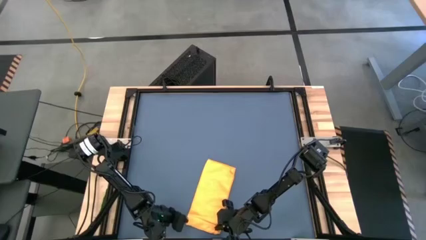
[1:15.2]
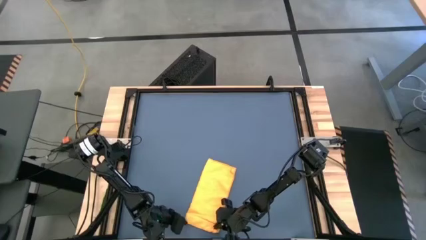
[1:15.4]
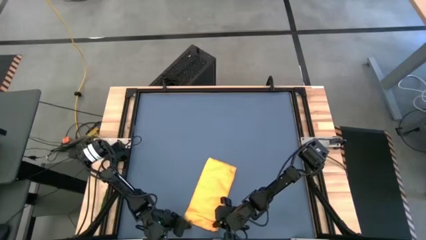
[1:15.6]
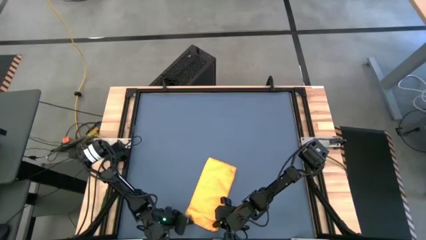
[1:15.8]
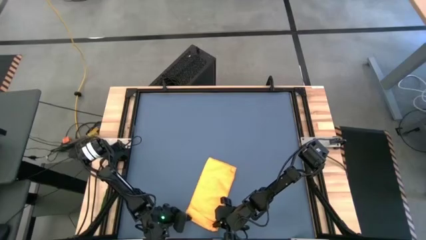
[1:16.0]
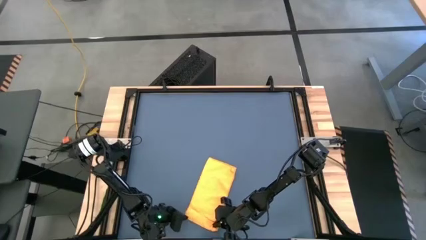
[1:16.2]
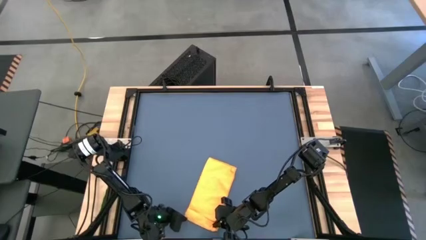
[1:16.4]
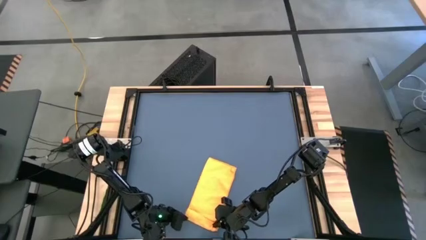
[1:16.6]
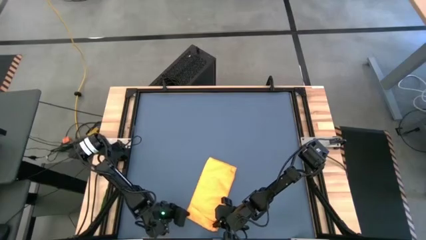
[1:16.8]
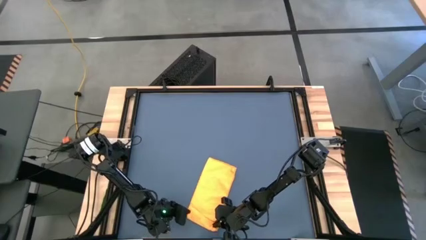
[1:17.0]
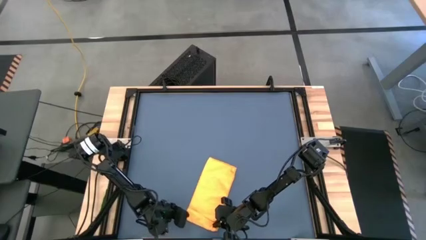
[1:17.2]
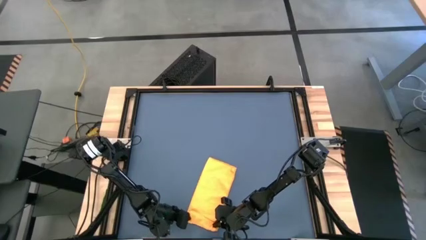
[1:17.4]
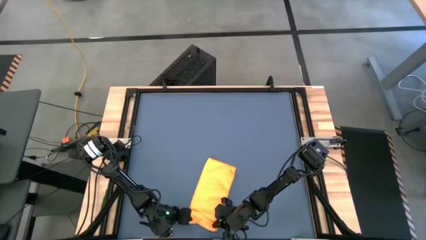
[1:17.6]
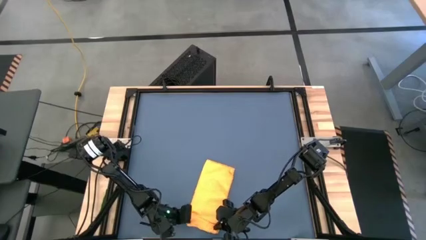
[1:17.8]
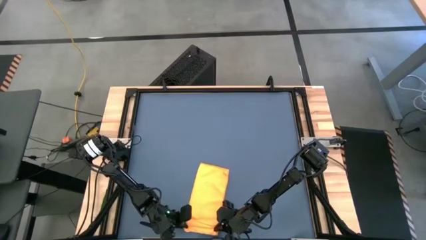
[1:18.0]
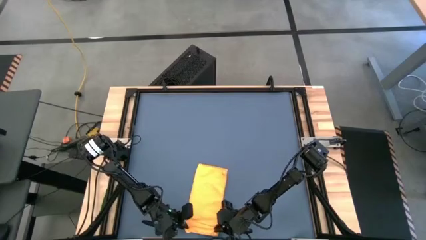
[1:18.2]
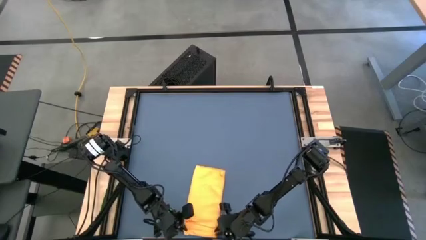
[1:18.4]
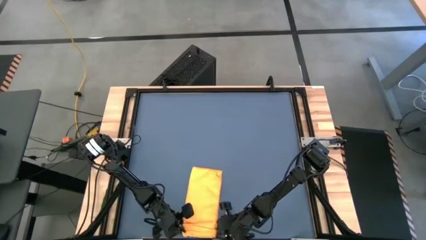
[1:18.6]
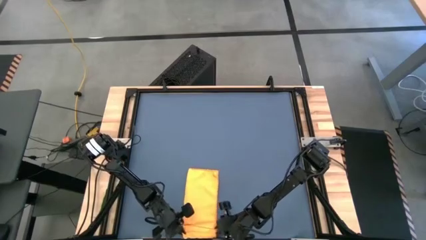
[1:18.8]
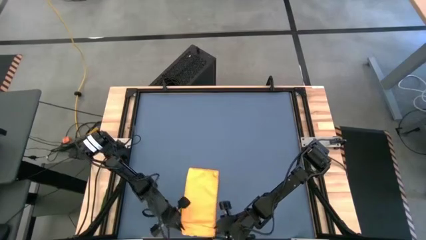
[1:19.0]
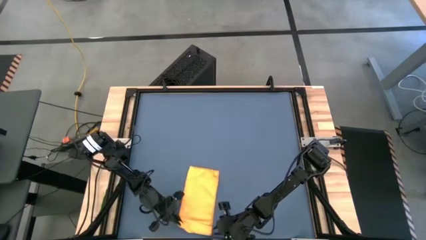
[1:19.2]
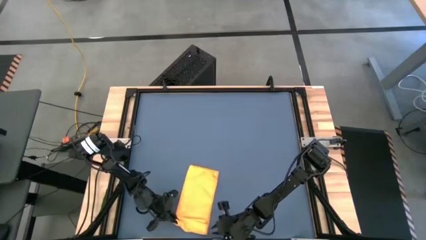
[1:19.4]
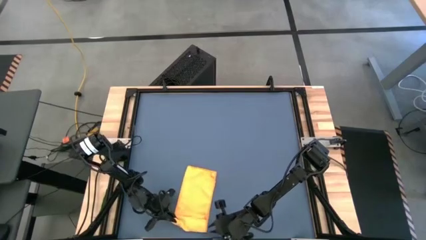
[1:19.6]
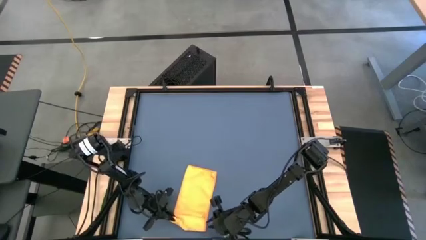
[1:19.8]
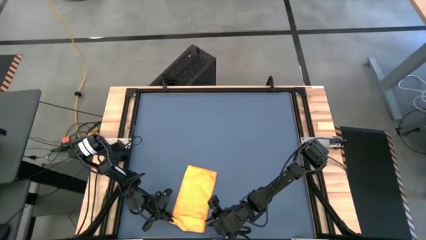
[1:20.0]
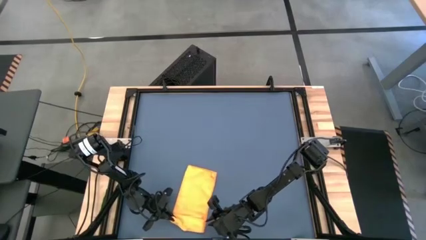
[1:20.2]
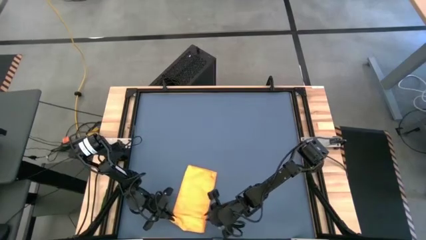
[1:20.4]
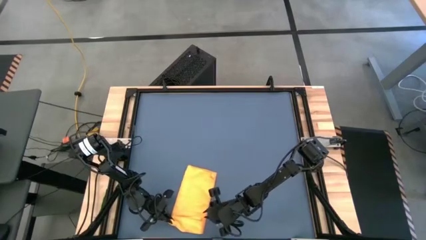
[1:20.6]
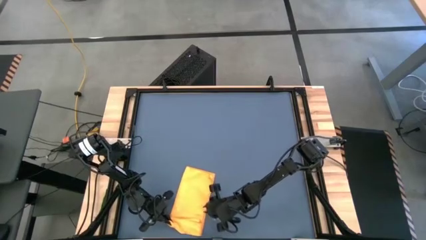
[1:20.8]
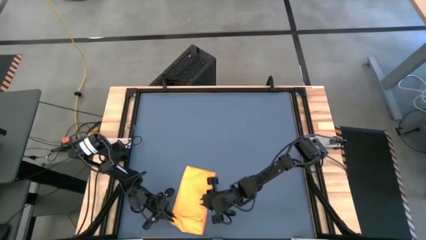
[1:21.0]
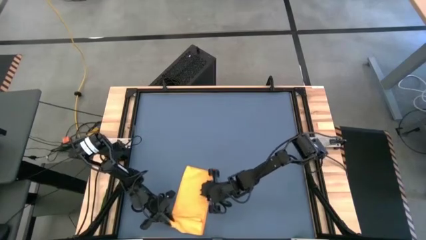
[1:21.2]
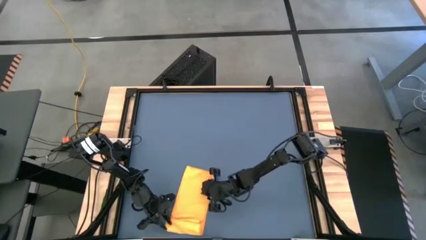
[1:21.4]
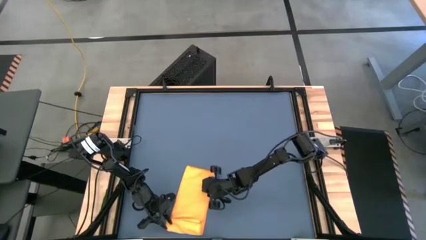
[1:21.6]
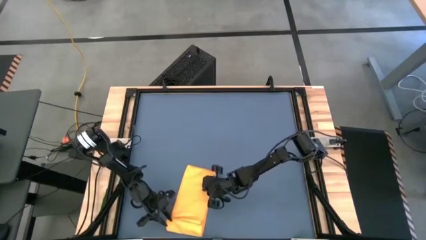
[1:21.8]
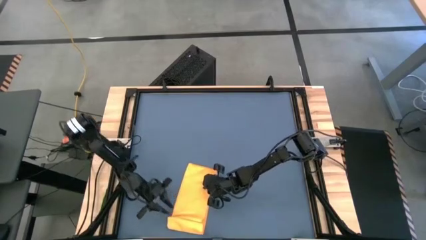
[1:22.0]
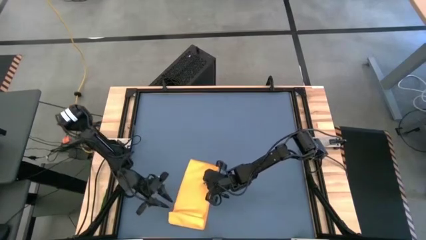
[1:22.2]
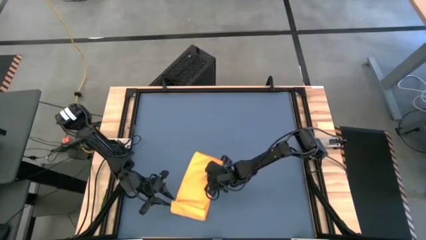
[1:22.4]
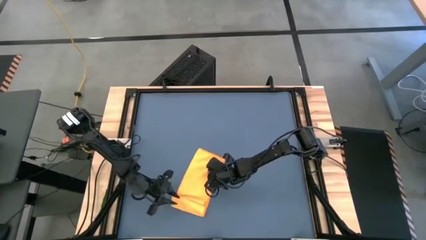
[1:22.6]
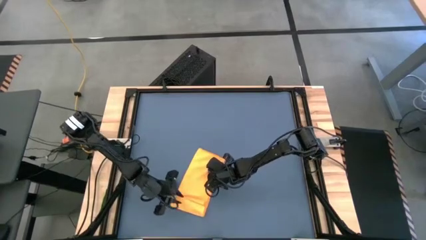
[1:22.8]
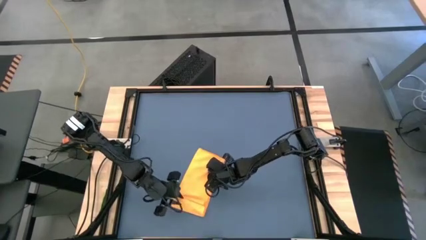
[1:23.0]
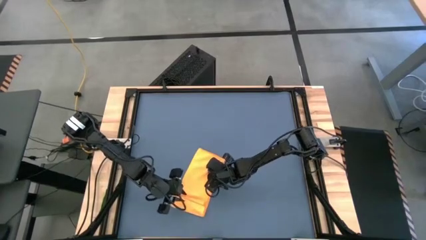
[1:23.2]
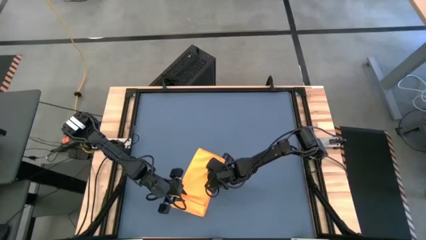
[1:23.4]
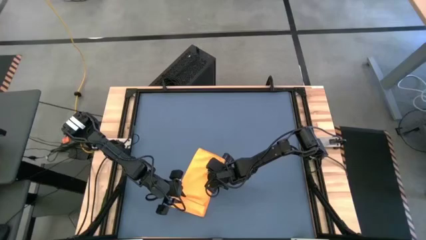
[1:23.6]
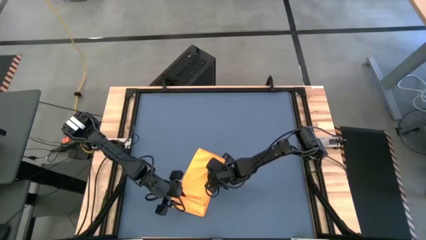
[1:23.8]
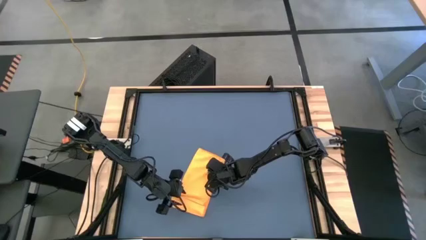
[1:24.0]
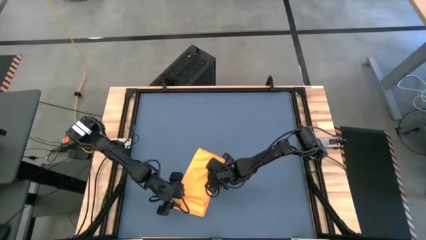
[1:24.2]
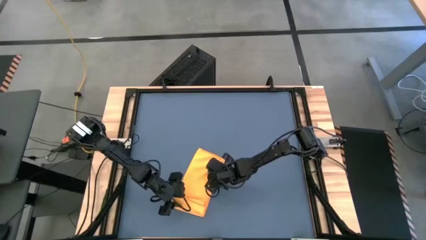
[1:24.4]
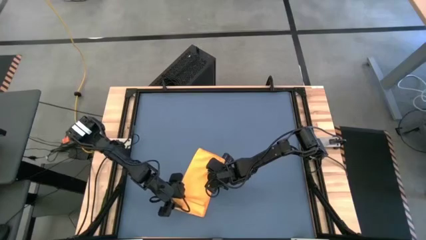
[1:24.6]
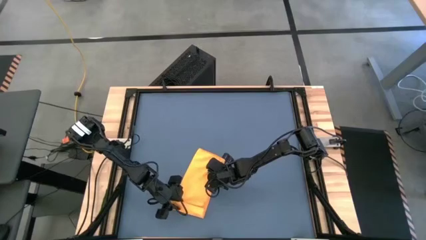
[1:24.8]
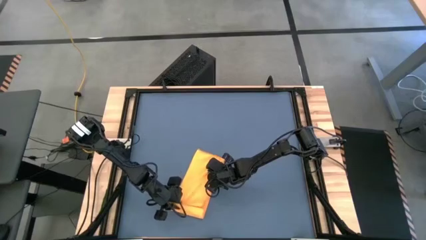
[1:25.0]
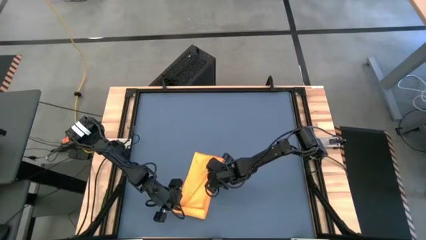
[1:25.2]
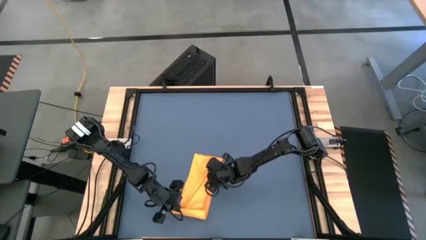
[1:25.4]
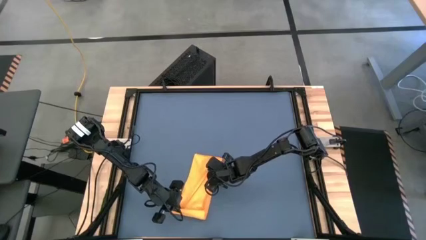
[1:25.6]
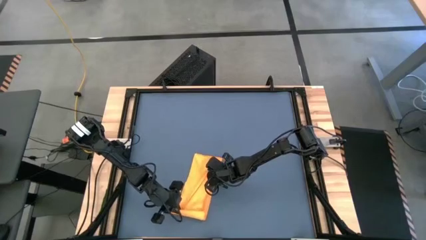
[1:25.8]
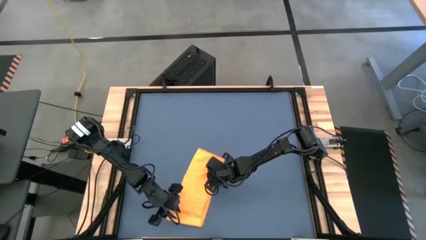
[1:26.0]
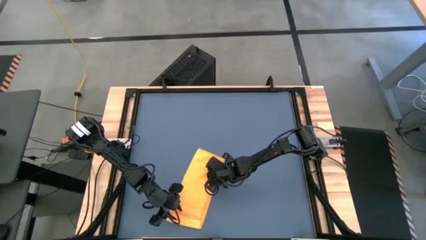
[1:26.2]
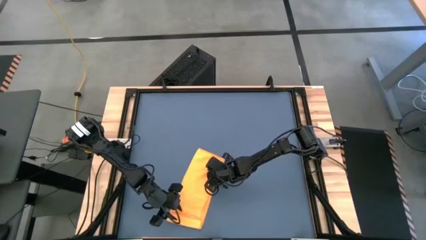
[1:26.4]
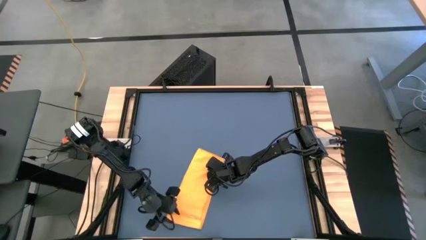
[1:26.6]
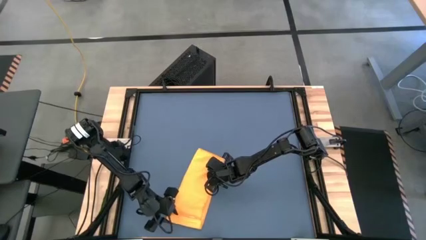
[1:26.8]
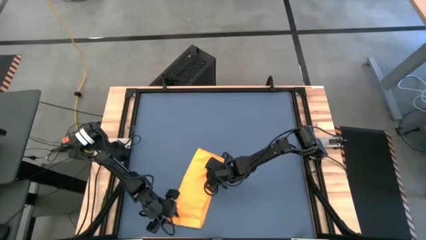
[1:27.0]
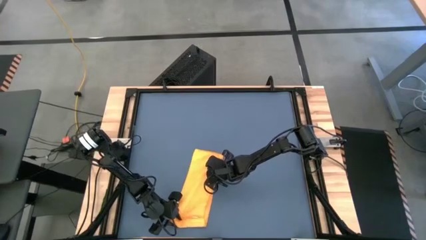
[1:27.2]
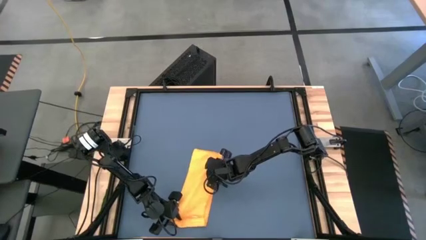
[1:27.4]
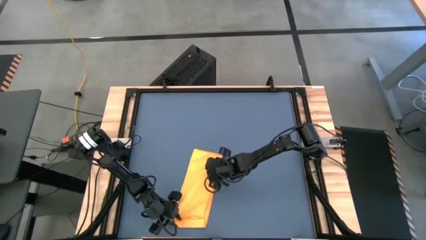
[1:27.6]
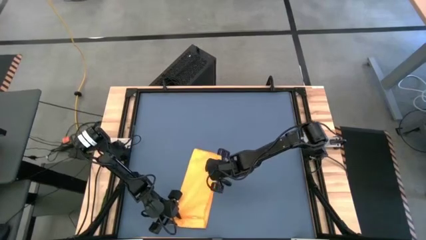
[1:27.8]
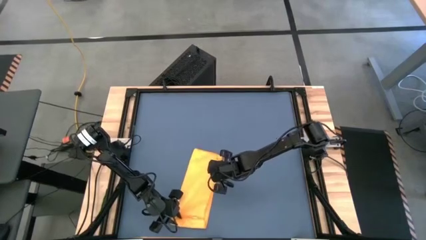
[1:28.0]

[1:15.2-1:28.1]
Task: Roll towel
Roll the yellow towel

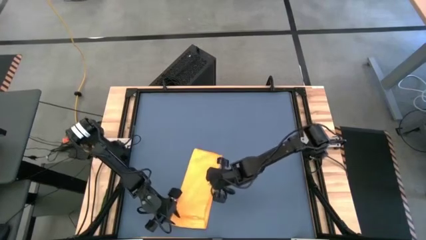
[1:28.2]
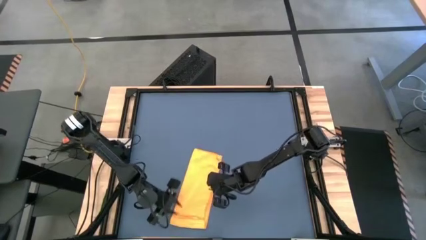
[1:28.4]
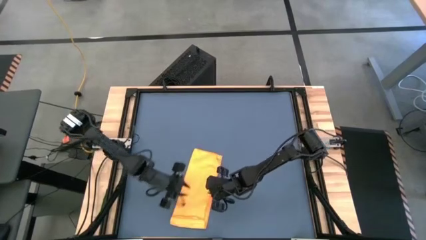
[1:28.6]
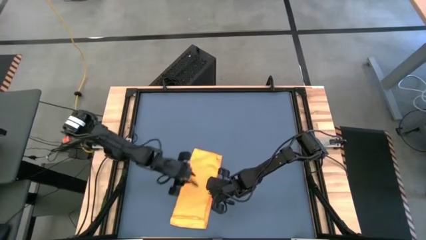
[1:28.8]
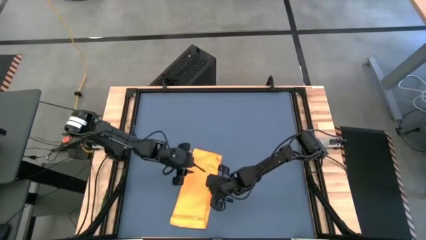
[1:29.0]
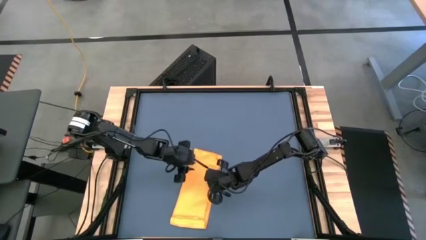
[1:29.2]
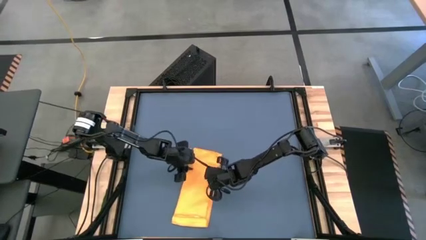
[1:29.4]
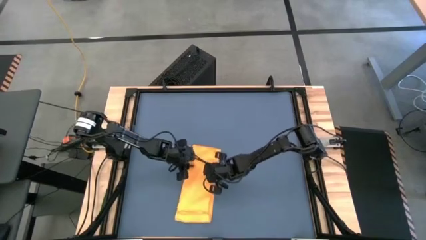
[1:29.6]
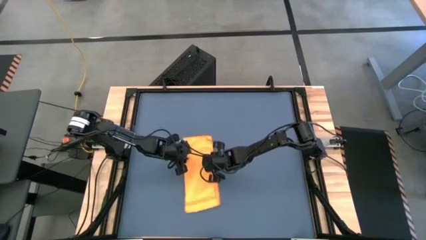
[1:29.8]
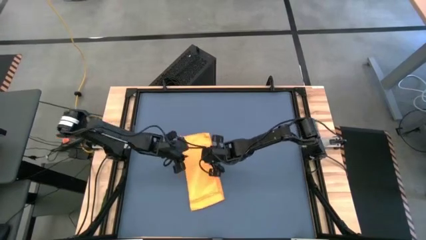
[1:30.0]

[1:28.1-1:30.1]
Adjust the yellow towel on the table

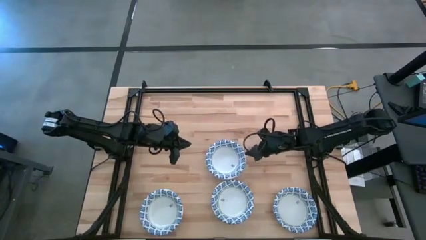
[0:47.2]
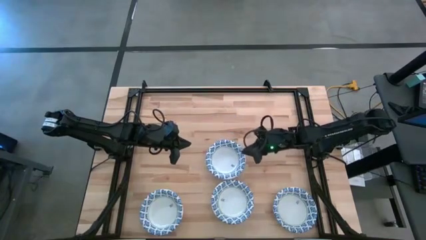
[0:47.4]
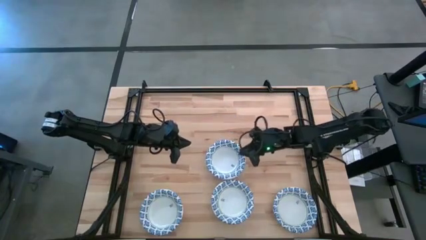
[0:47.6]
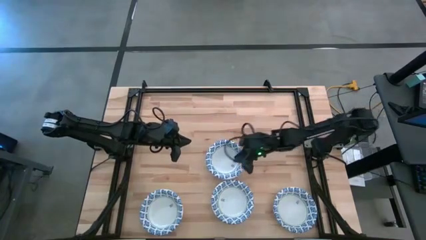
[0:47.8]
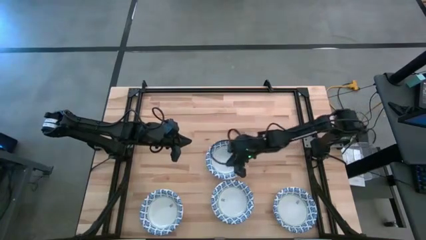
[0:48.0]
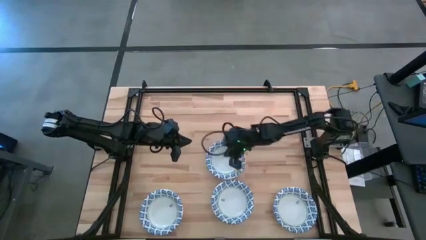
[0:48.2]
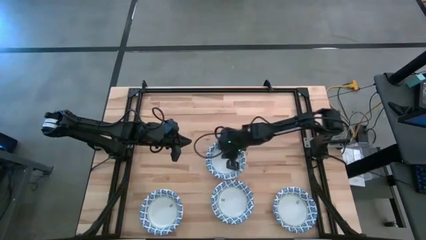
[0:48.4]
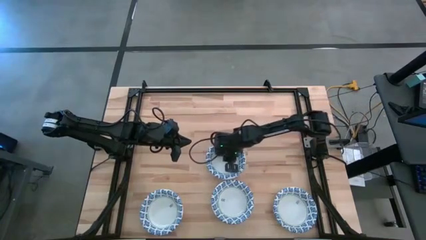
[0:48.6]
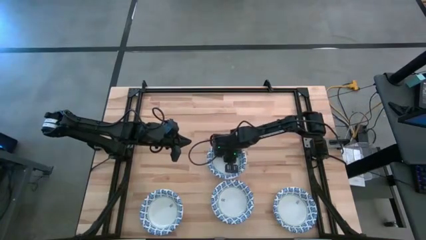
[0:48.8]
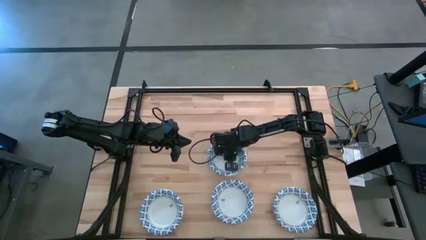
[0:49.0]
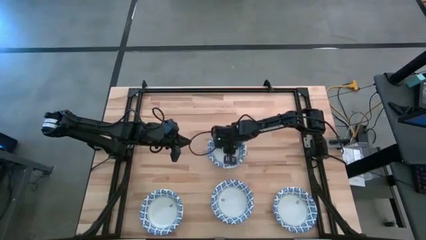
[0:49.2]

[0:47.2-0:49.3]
Task: Nest bowls inside each other
Adjust the white patterned bowls
